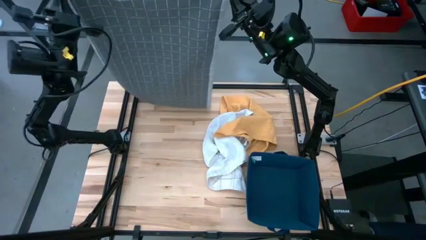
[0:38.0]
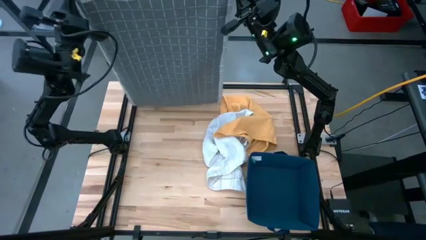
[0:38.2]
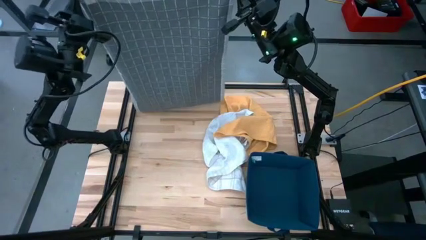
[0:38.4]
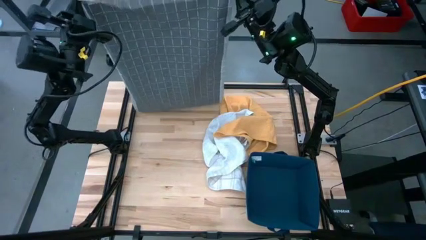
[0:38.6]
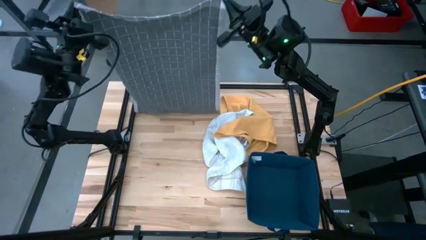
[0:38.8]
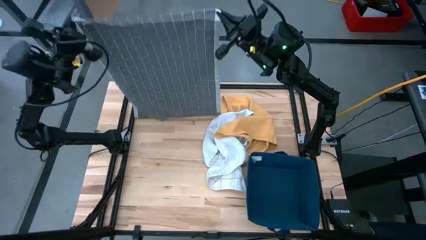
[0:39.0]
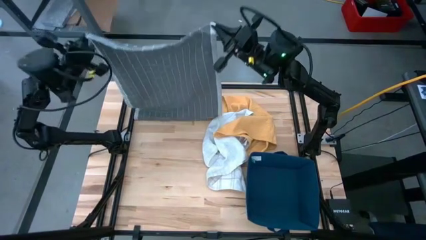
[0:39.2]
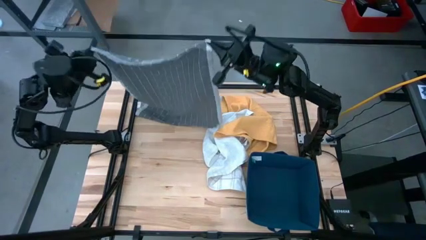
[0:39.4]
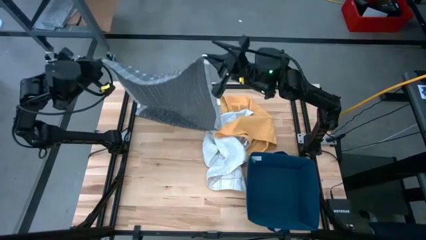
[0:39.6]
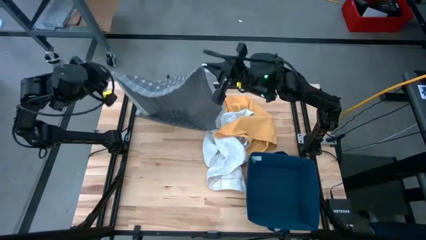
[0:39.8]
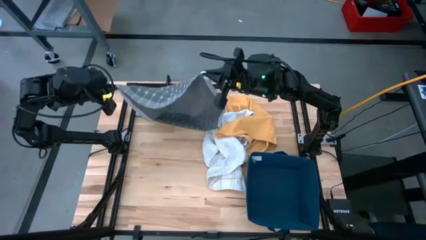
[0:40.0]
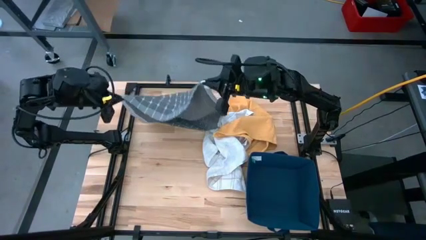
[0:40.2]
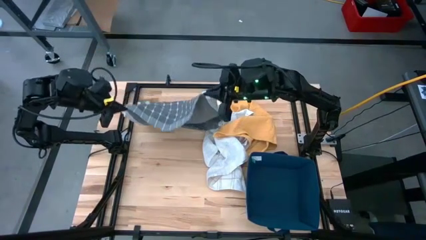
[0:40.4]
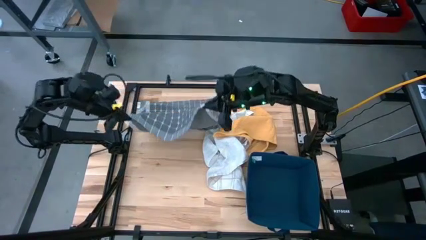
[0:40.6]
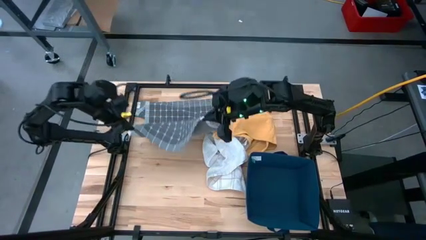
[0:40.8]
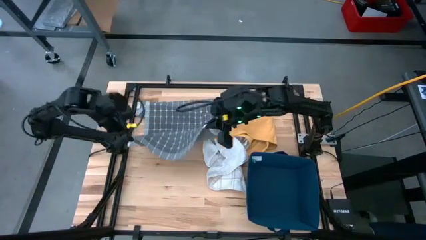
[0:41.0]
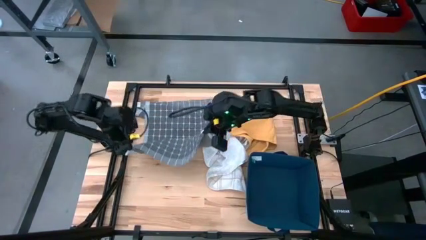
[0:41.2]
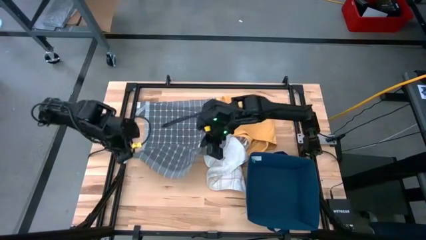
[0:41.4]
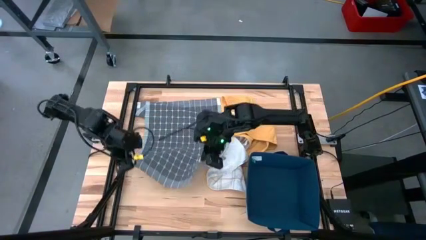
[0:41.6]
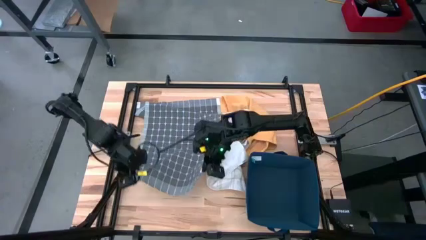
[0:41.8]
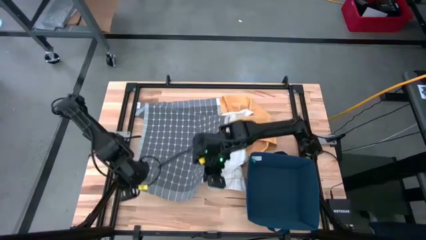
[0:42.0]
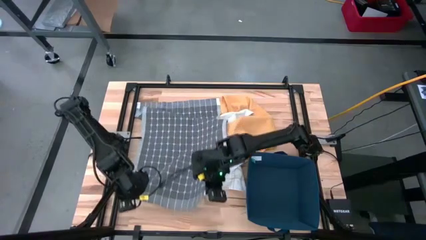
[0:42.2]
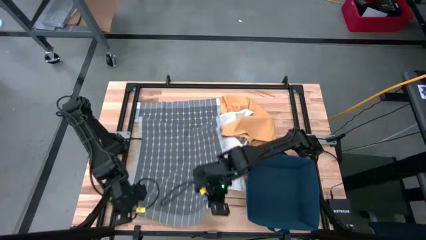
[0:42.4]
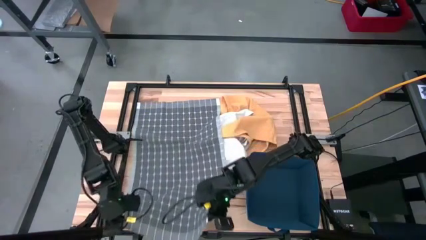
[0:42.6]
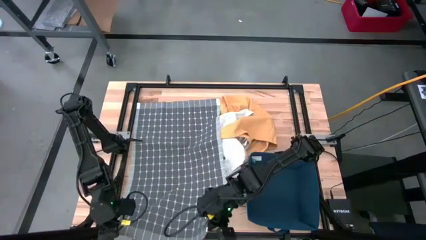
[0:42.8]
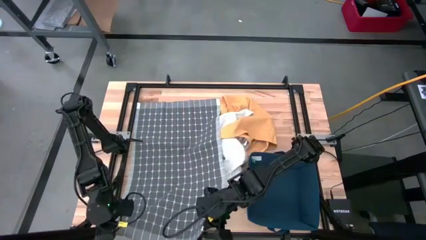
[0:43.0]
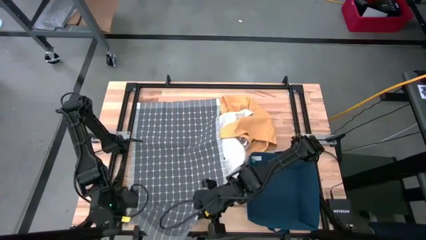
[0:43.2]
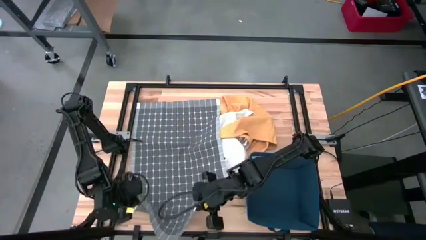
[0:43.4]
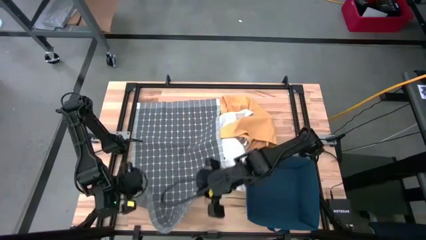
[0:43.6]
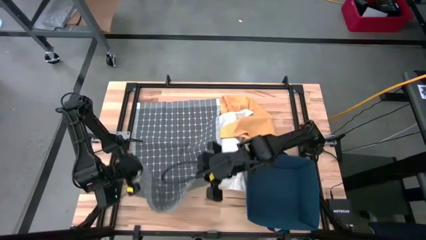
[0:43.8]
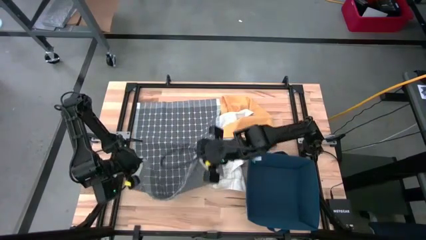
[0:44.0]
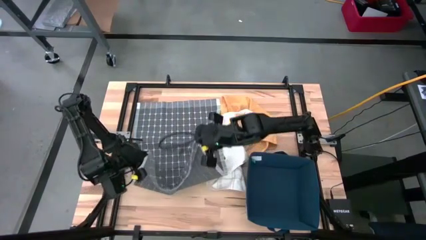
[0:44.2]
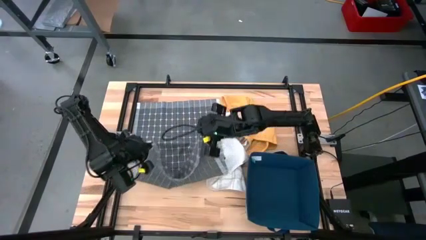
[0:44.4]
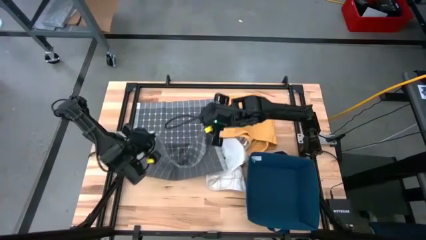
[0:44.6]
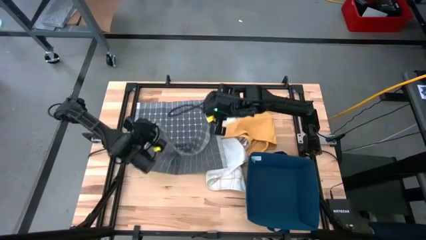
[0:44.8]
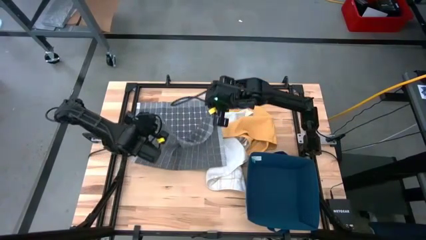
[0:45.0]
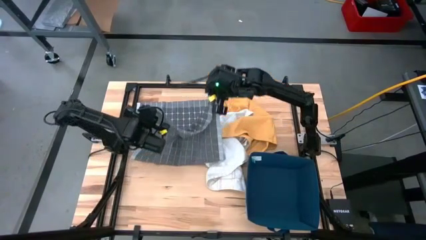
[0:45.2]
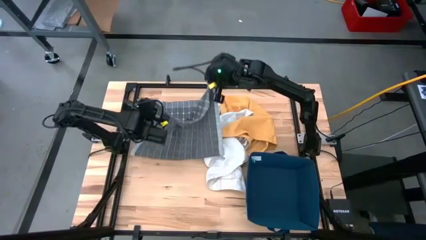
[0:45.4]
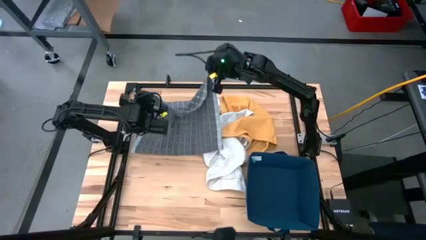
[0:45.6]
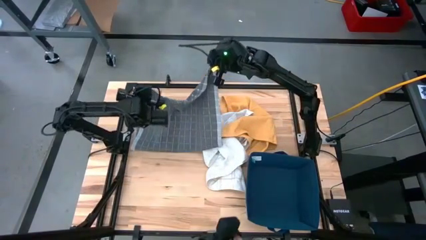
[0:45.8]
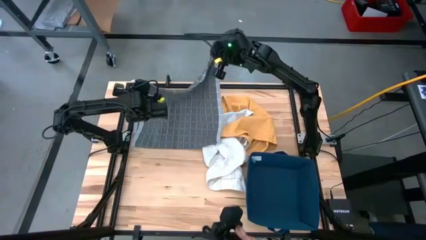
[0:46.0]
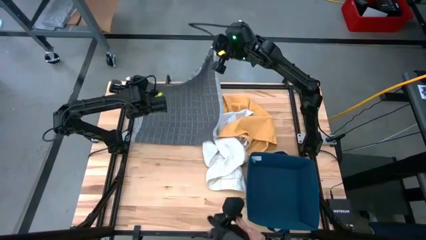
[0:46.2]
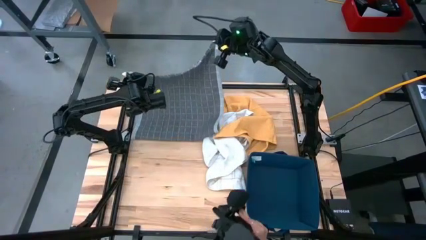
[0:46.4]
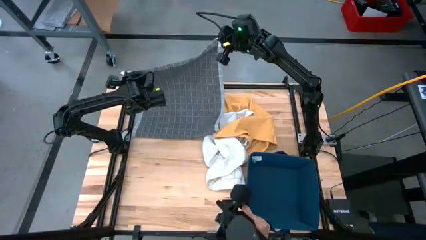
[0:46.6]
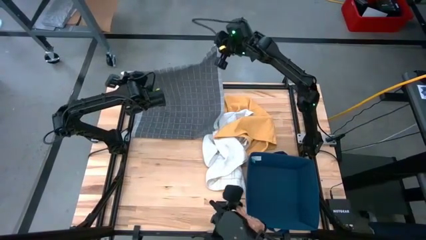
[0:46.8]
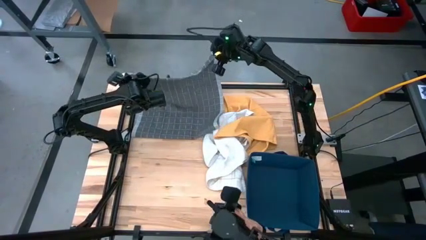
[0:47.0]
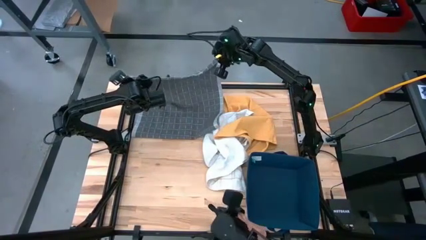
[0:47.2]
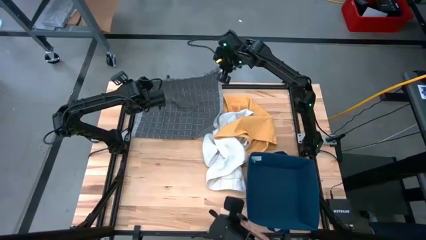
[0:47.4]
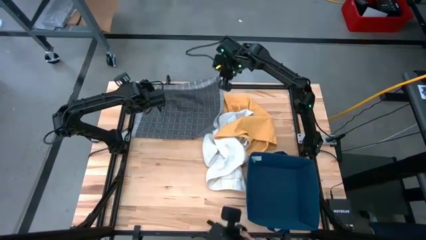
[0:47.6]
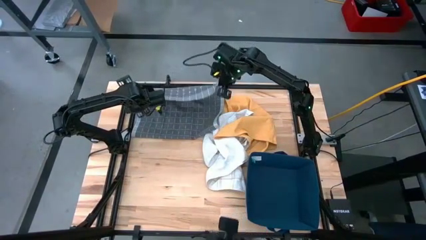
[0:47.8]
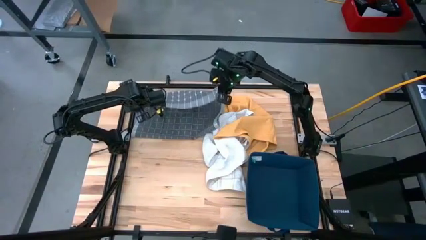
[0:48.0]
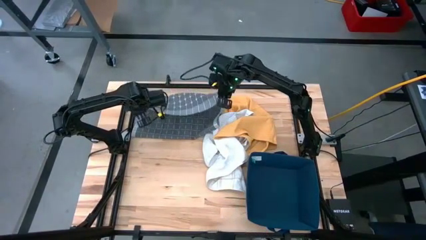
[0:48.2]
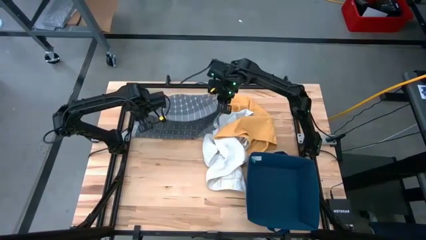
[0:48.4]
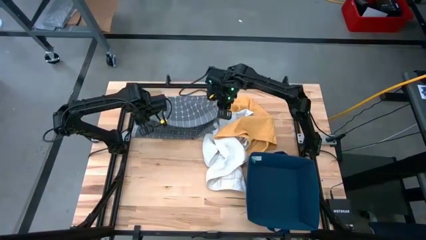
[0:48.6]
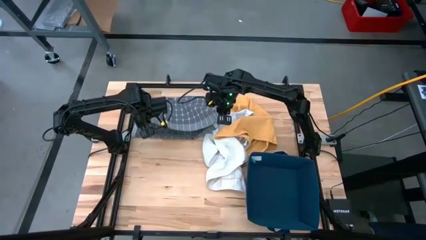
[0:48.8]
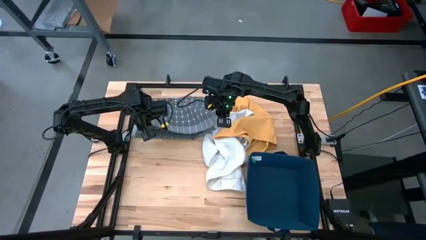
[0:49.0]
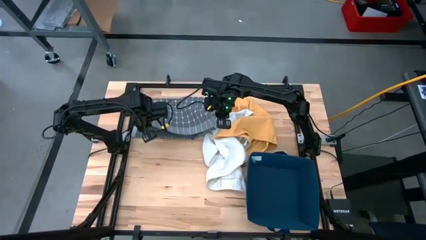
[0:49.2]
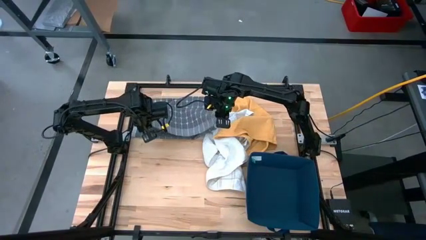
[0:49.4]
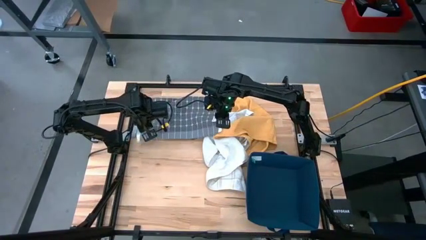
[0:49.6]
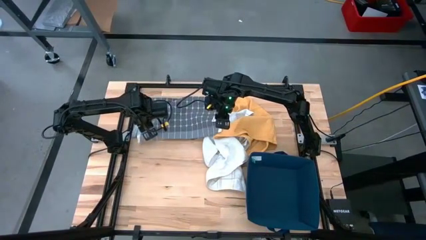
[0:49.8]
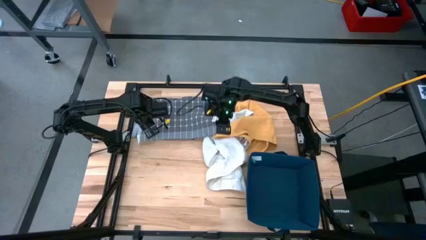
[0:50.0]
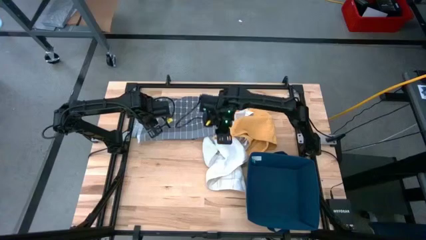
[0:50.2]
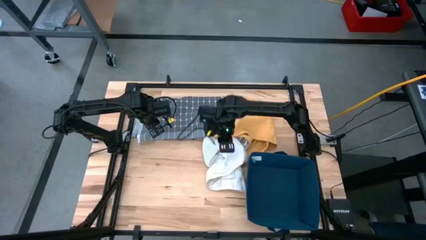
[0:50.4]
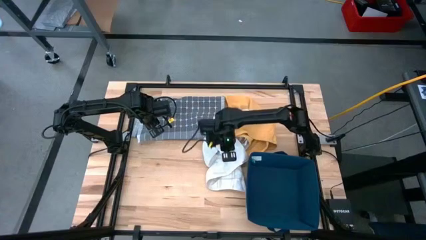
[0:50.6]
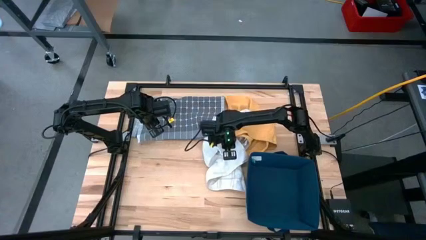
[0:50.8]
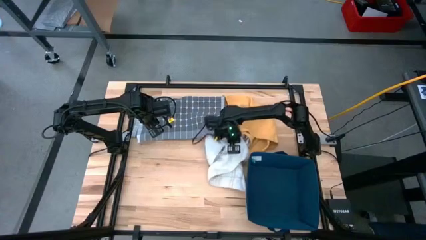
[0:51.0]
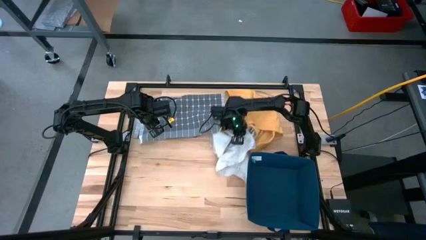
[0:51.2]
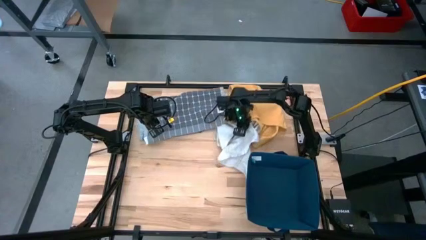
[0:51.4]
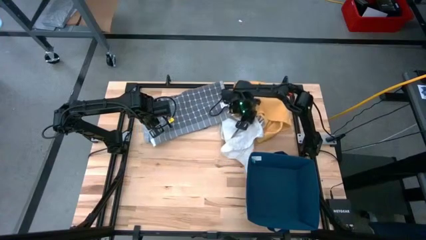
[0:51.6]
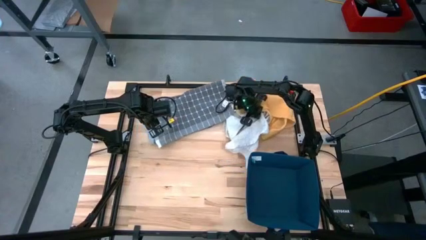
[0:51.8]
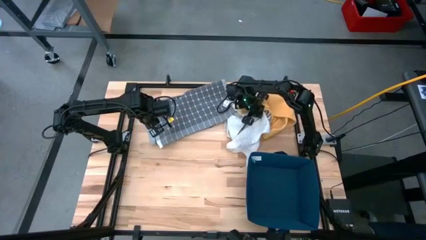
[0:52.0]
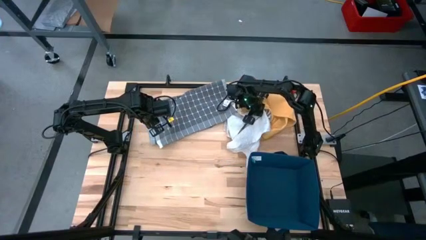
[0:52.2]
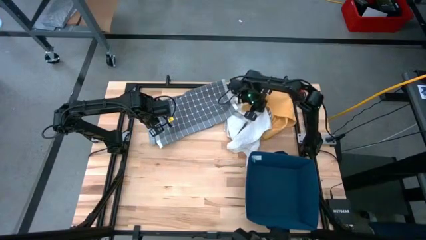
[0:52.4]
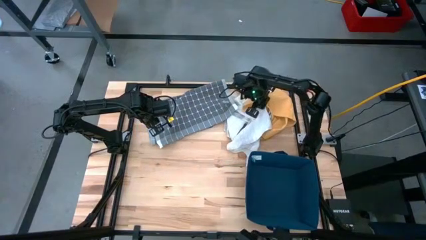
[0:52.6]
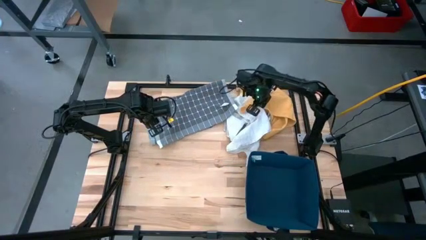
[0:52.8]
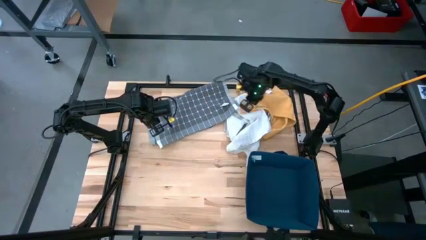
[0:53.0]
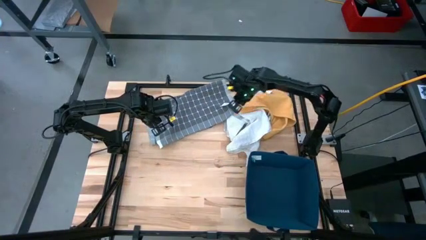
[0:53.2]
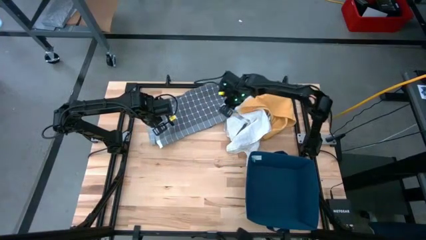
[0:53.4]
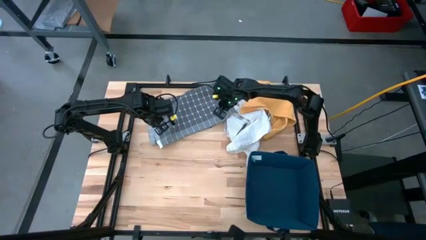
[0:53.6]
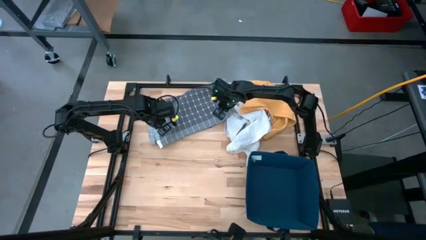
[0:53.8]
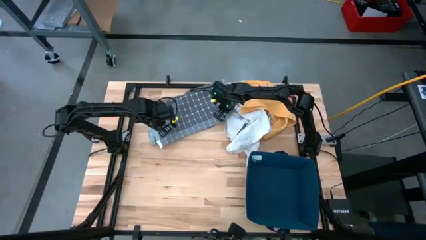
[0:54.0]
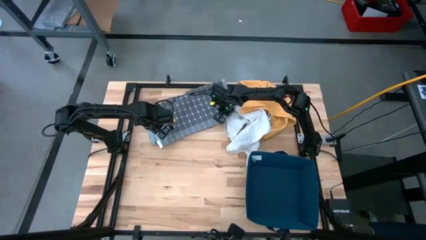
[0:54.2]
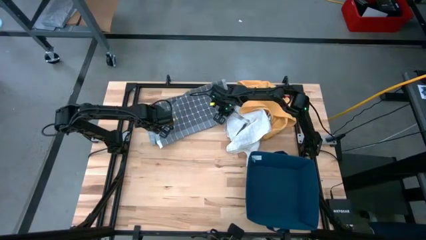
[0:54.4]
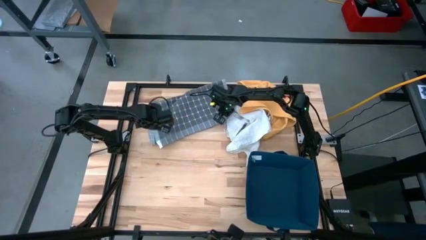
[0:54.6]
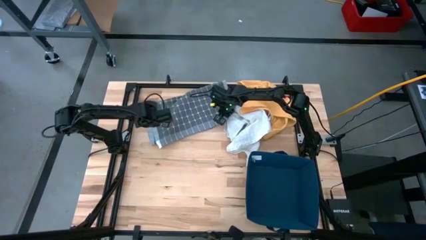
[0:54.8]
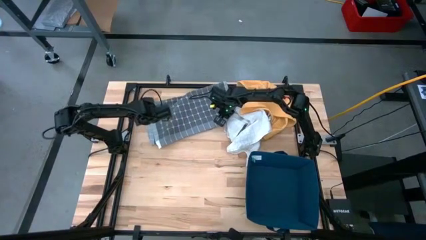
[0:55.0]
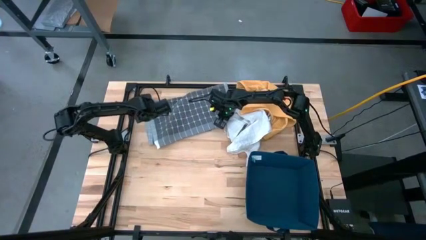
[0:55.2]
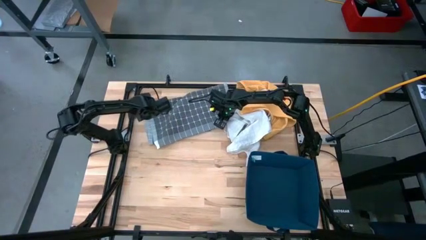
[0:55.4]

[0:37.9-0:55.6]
Task: Fold towel
Fold the gray towel
